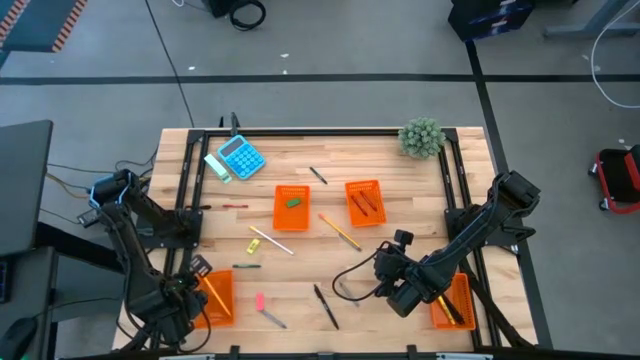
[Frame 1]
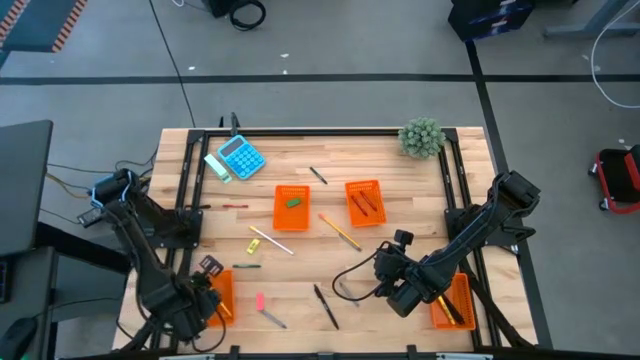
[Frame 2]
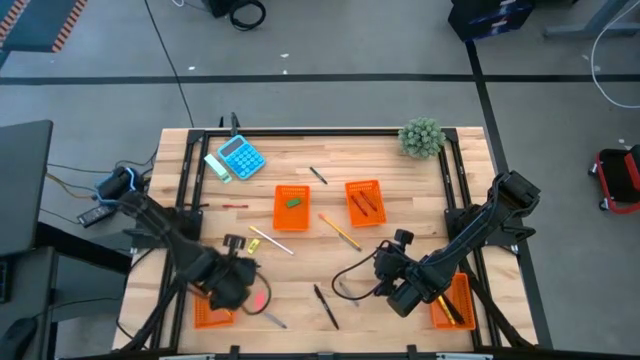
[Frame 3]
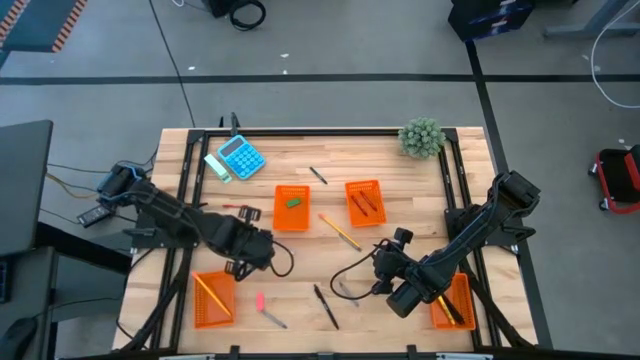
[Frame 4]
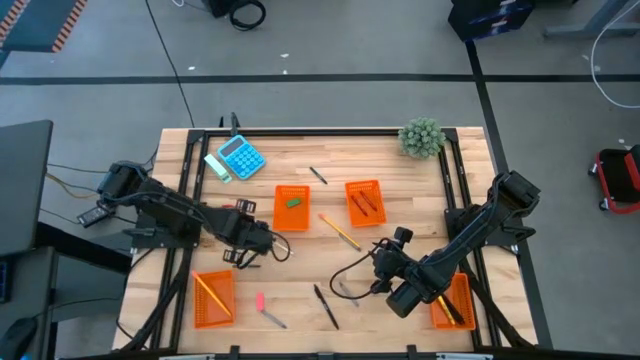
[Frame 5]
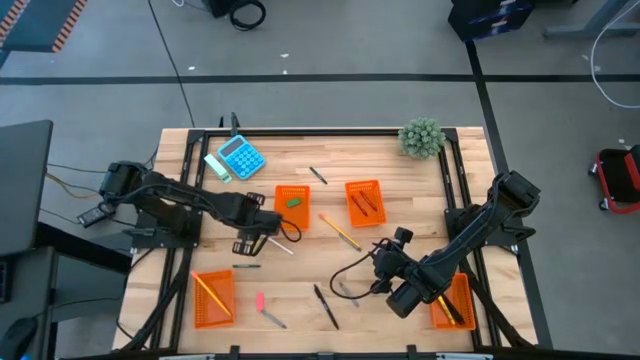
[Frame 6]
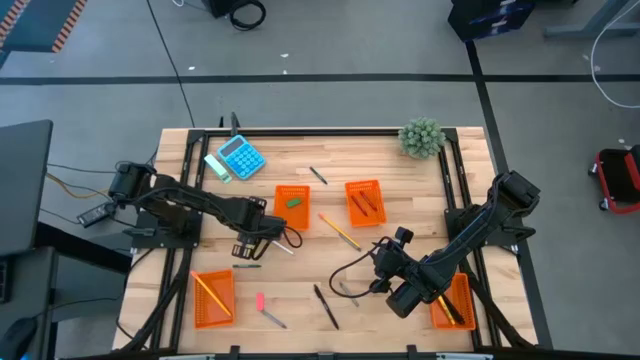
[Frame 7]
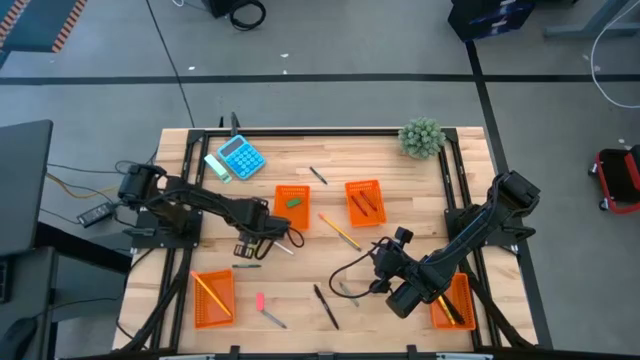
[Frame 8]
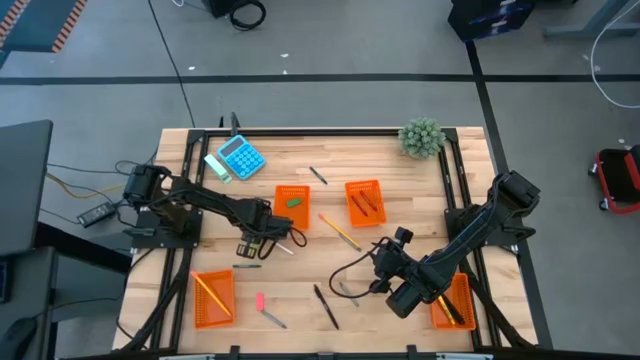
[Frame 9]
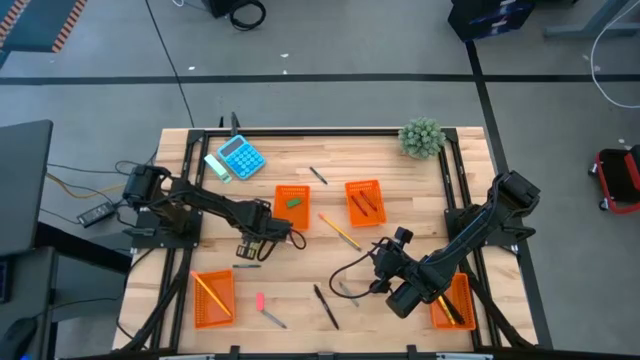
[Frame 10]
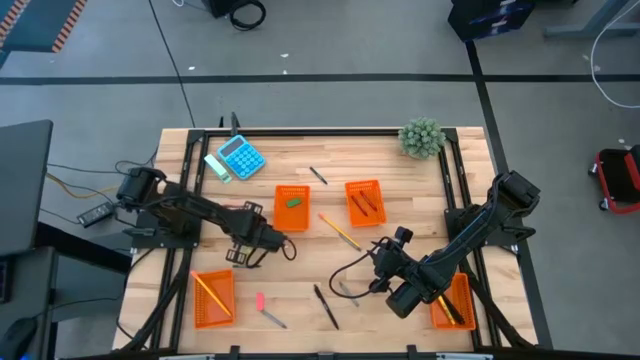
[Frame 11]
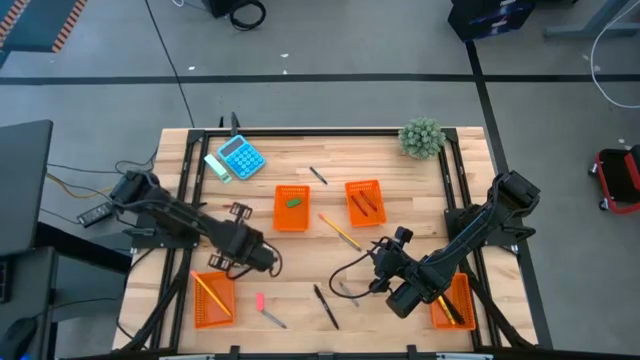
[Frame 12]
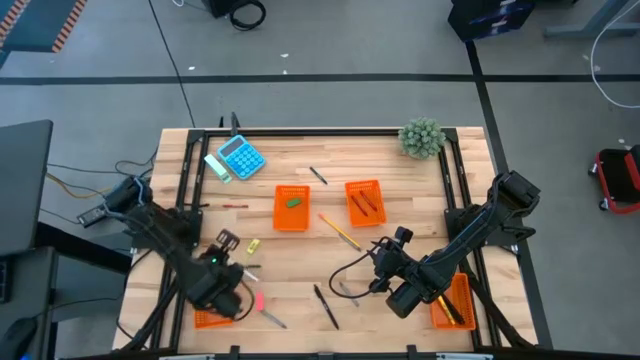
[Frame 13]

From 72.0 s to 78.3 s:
Task: Sort crayons/erasers/pens/pencils in bins
Put the white pencil into the bottom left orange bin

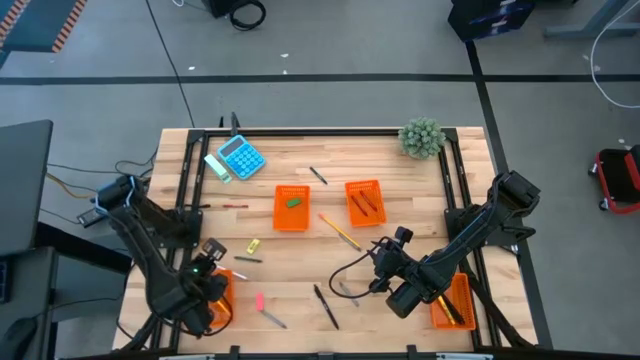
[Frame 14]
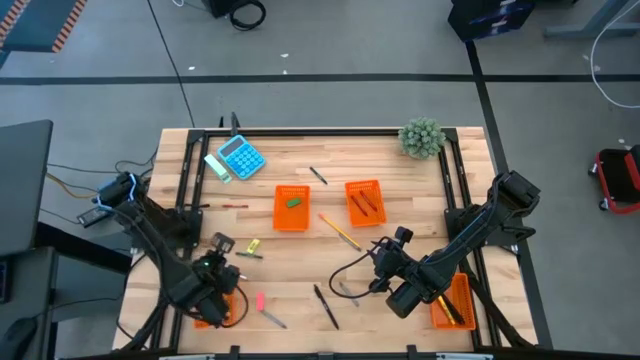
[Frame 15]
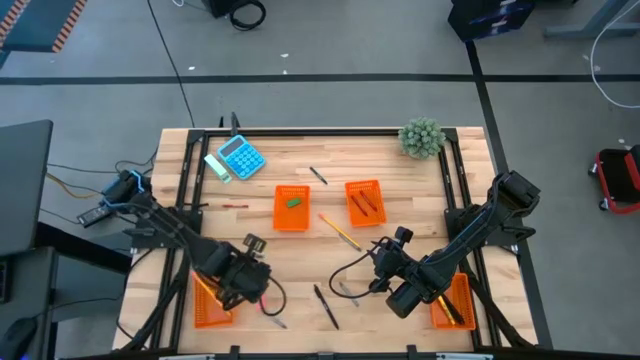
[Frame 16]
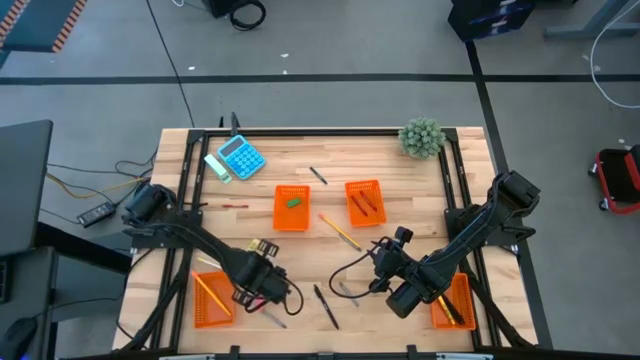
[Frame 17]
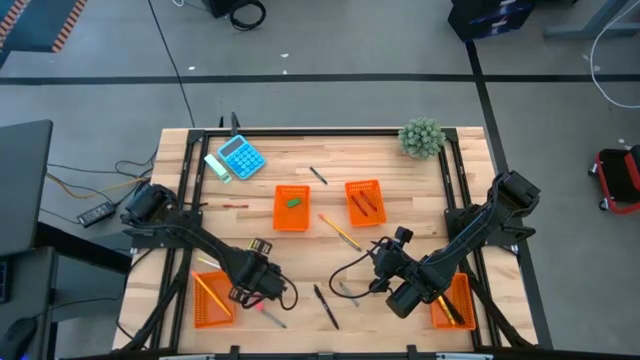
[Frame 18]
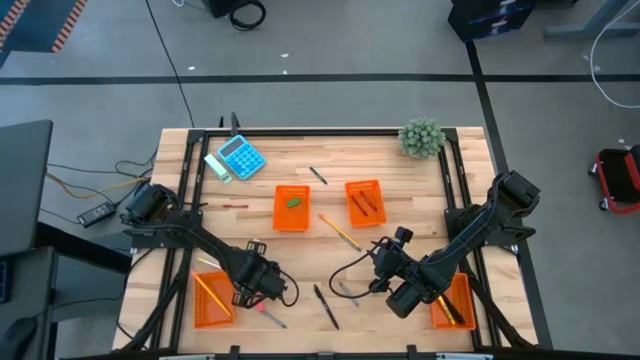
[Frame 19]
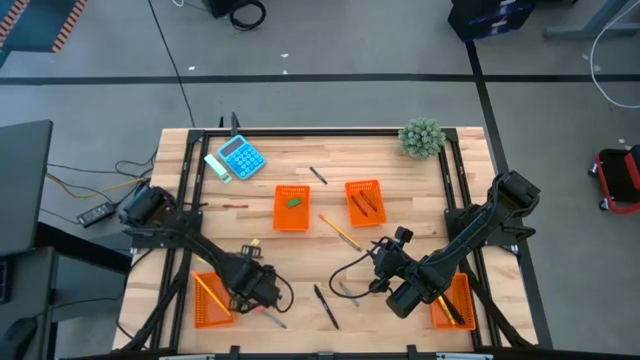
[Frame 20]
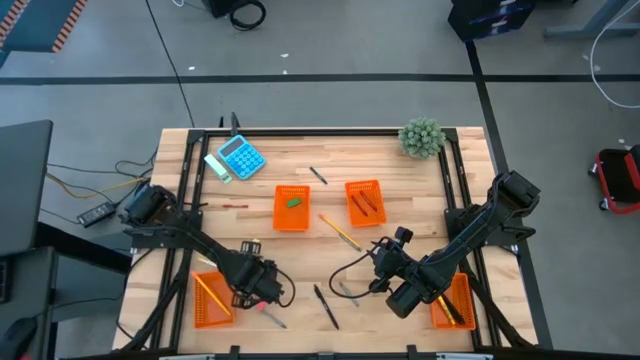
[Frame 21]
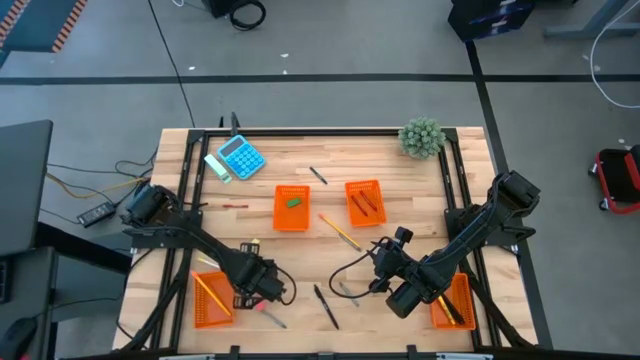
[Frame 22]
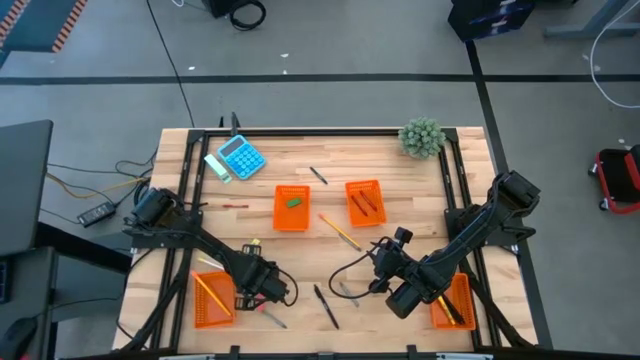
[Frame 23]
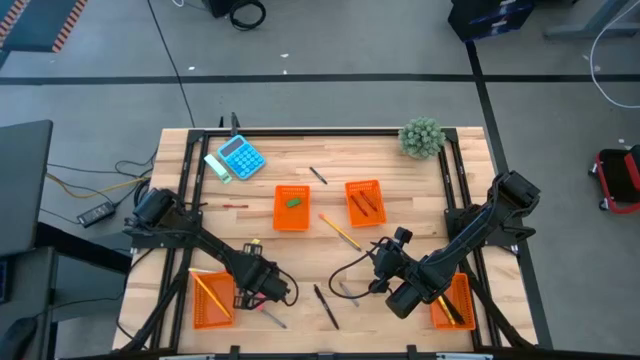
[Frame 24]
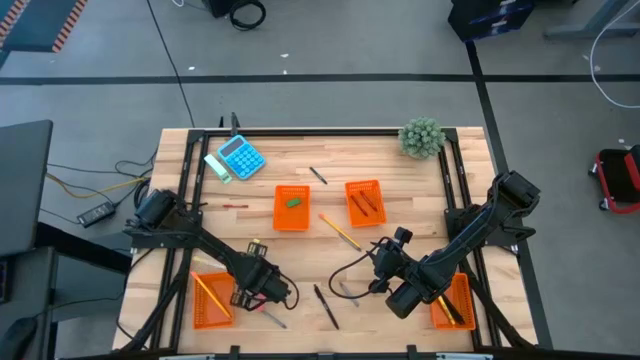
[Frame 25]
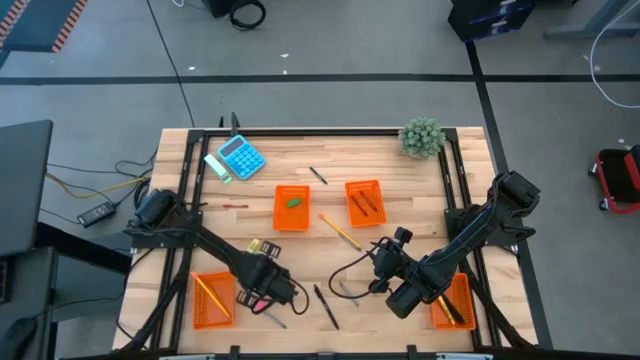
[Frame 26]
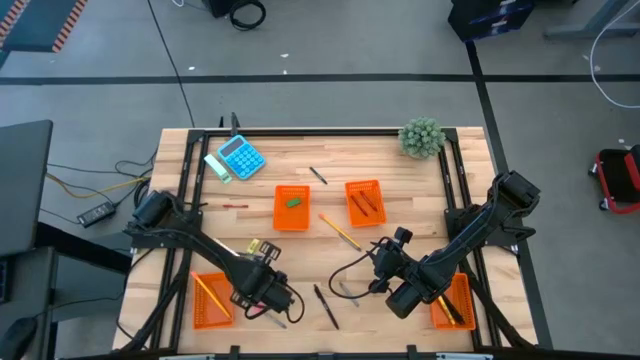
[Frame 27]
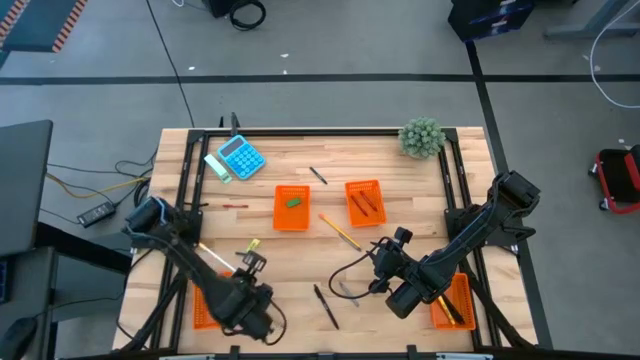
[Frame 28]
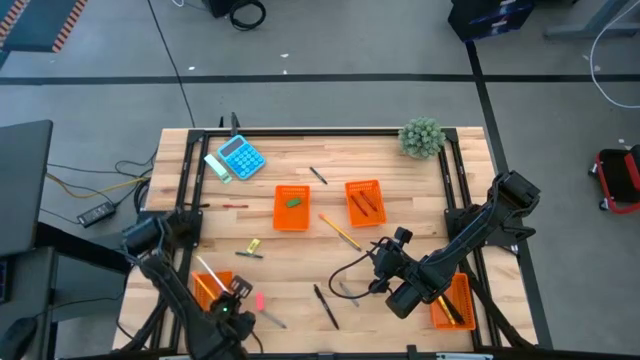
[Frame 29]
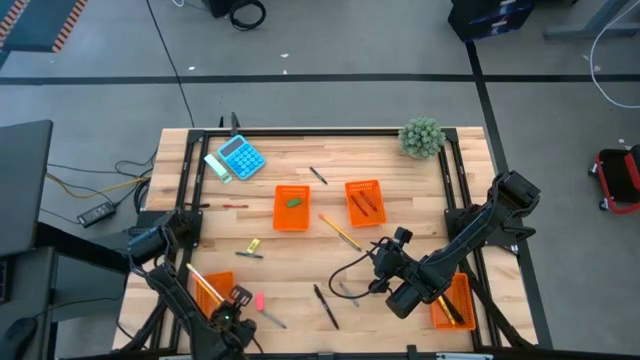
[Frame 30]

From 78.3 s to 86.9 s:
Put the white pencil into the bottom left orange bin

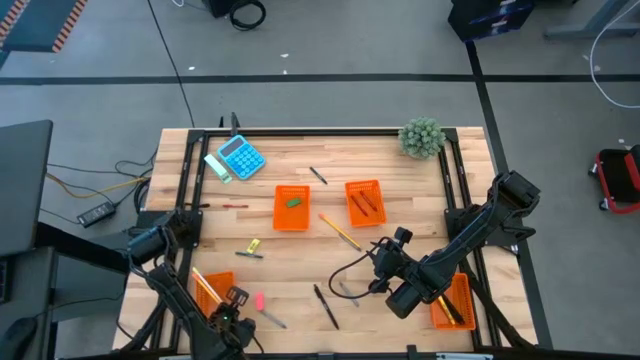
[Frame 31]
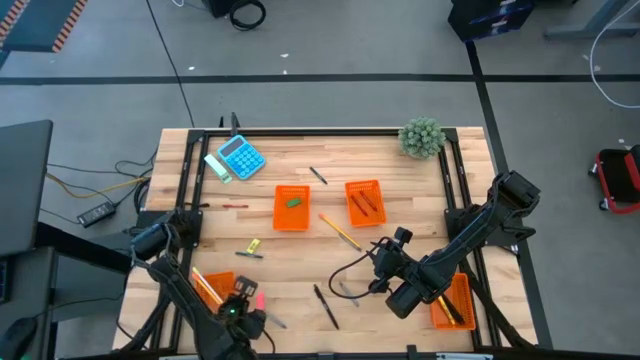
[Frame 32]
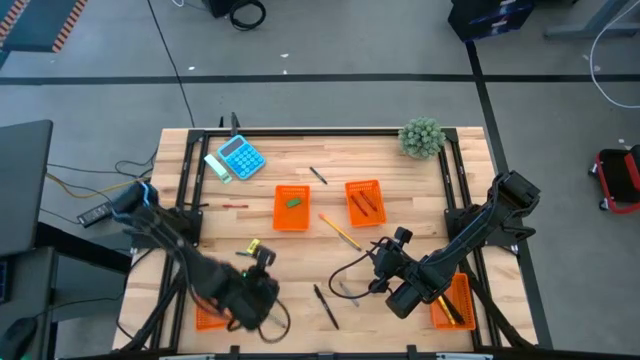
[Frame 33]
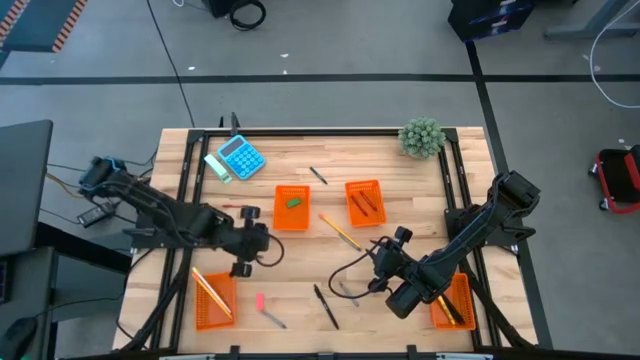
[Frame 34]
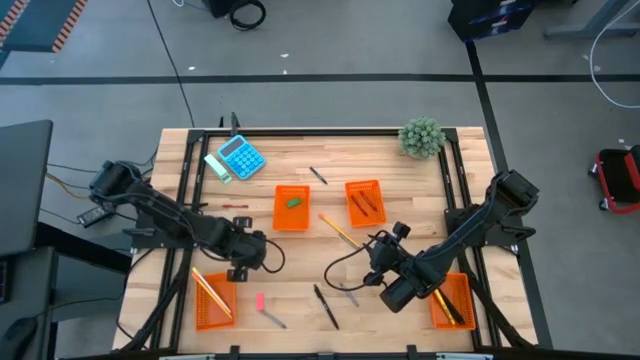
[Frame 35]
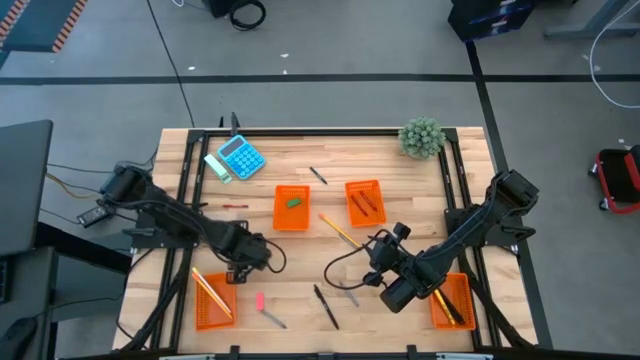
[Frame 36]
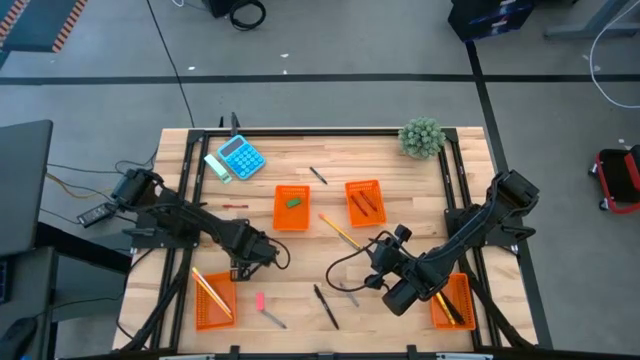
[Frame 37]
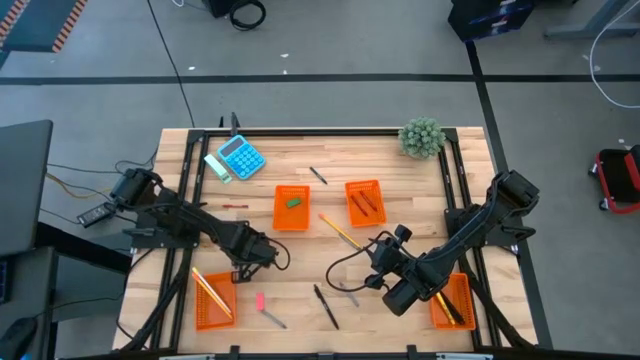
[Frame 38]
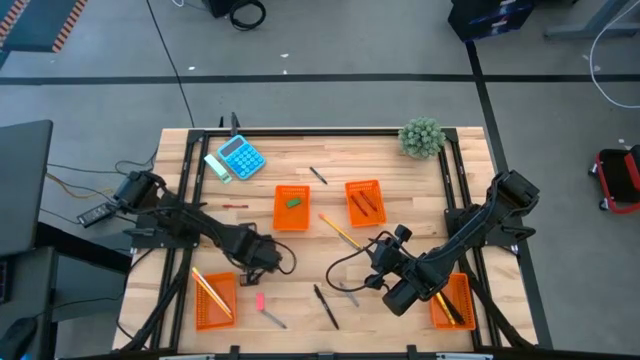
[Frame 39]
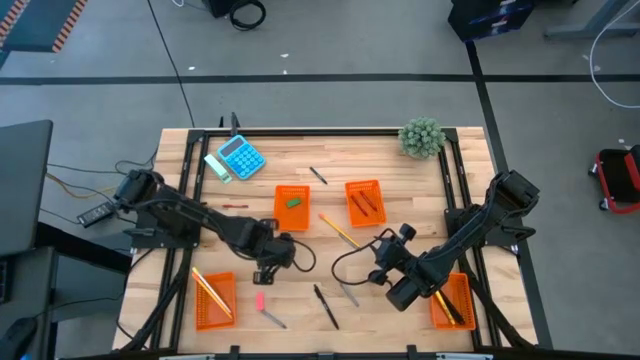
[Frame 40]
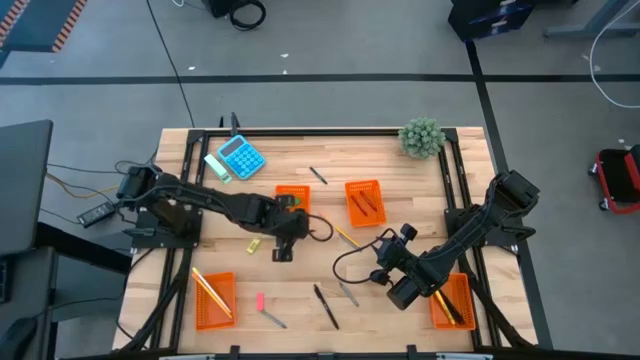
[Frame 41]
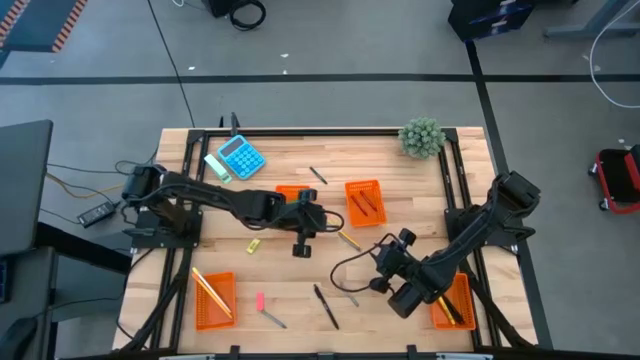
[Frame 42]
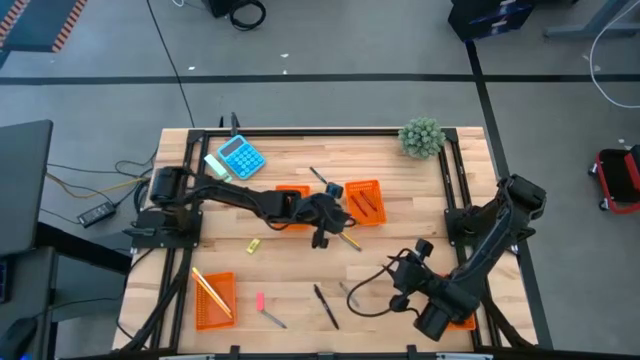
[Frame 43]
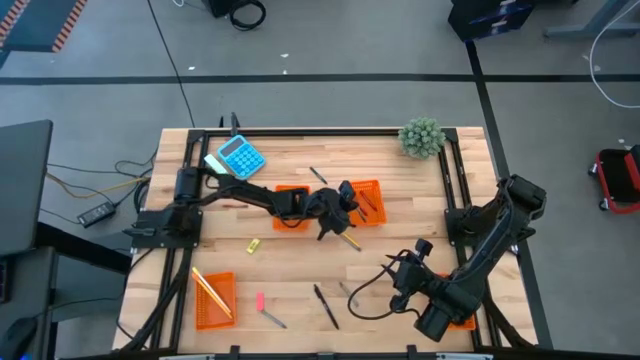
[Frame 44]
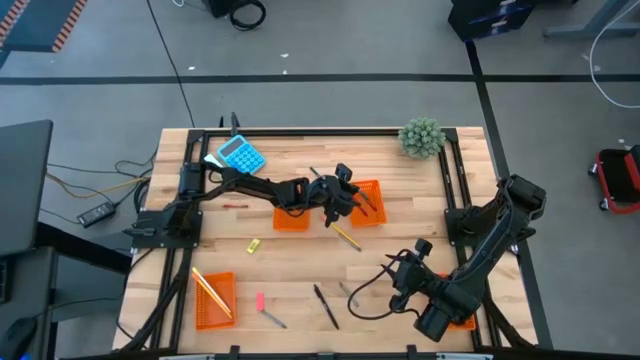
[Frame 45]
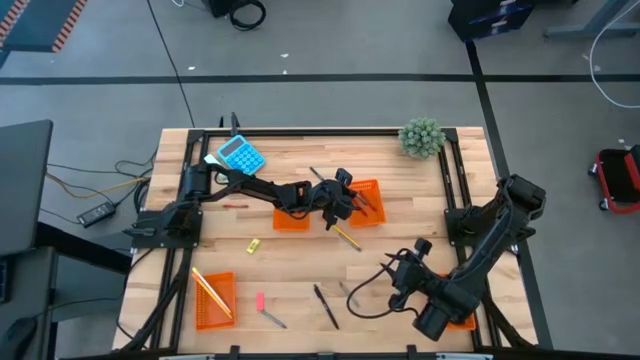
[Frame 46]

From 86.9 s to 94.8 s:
Put the bottom green crayon into the top right orange bin
